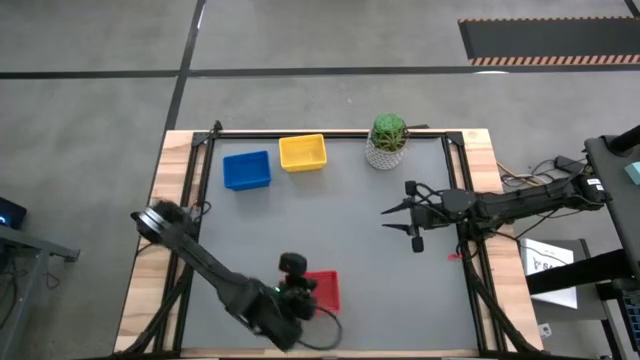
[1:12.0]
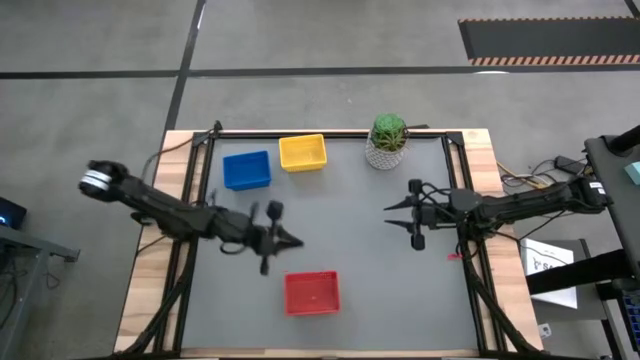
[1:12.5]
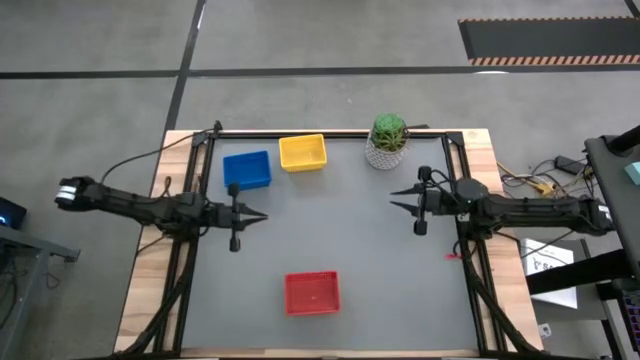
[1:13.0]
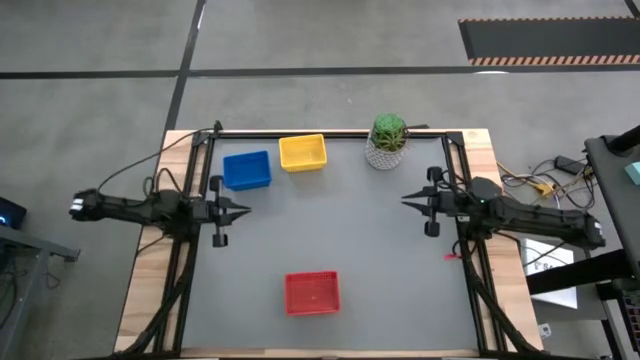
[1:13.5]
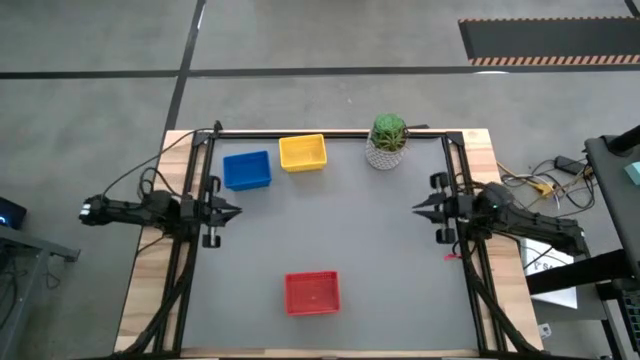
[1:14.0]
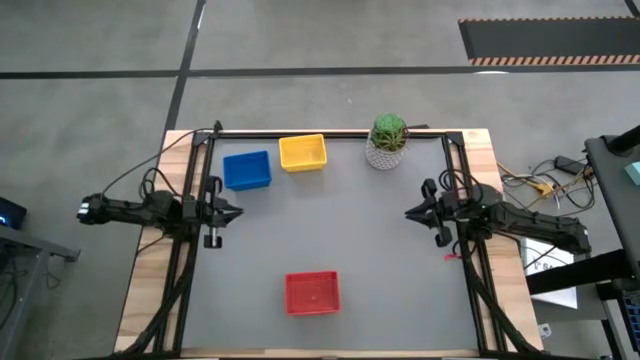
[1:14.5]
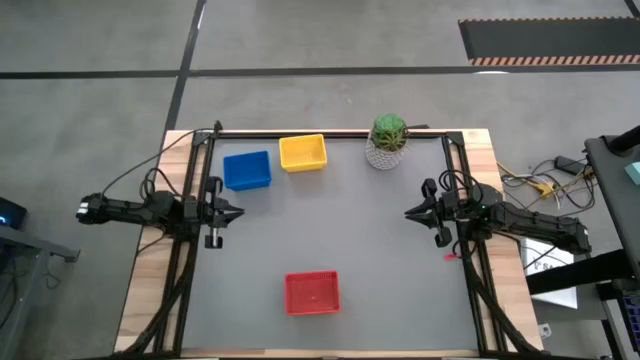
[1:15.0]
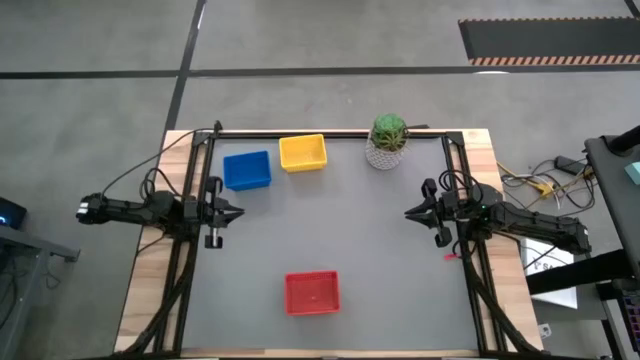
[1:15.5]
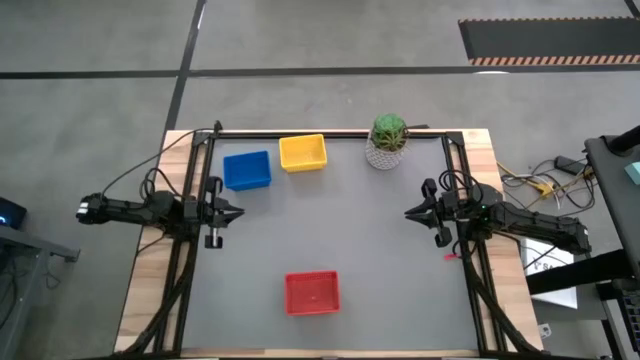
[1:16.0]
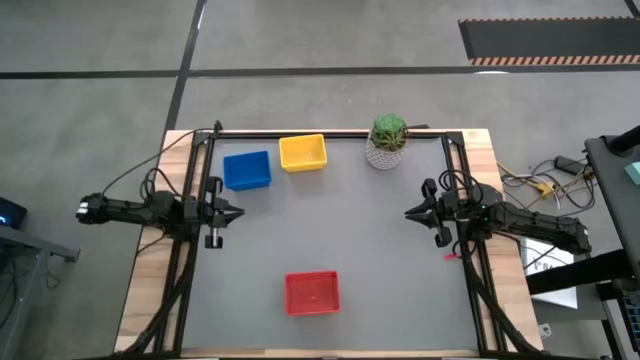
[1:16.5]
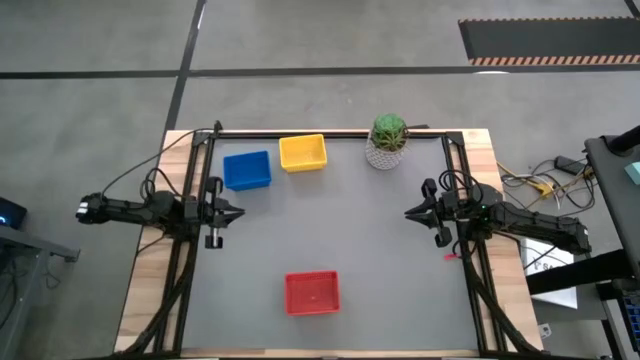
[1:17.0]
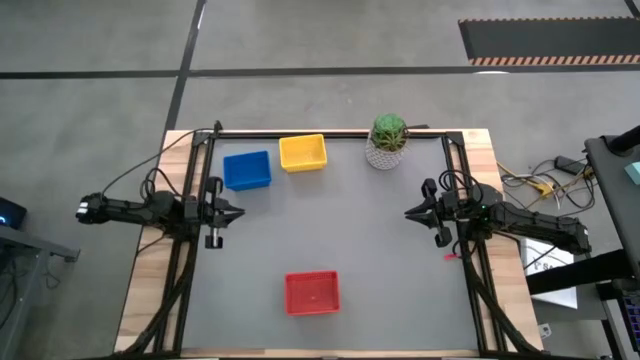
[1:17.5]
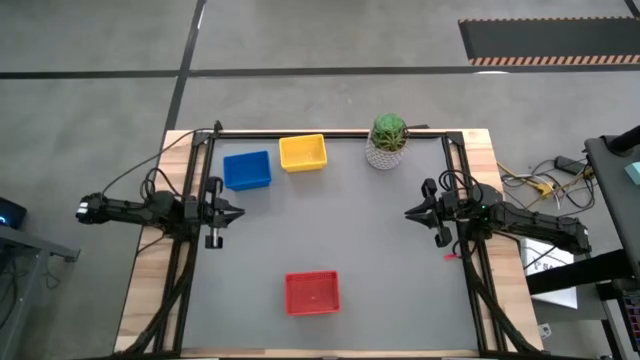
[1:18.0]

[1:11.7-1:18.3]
Return to Home Position
